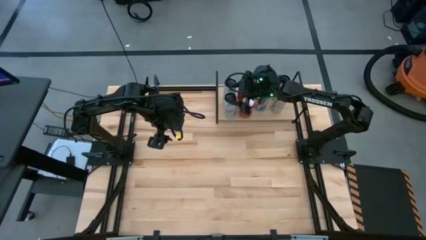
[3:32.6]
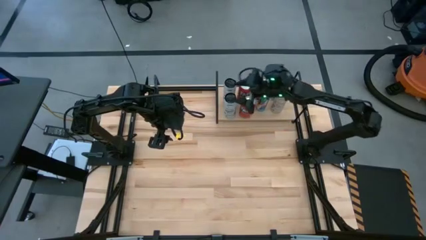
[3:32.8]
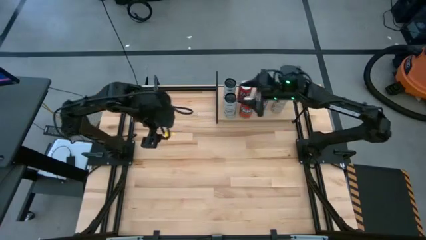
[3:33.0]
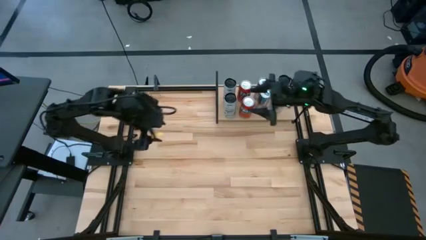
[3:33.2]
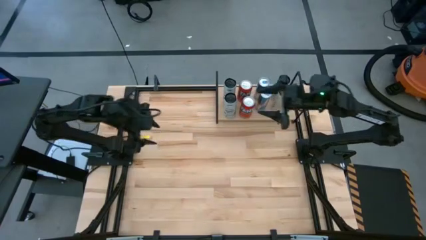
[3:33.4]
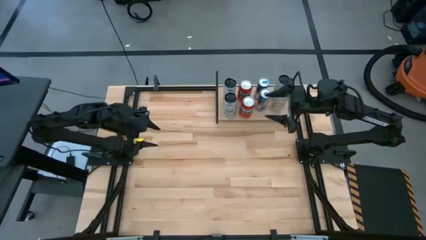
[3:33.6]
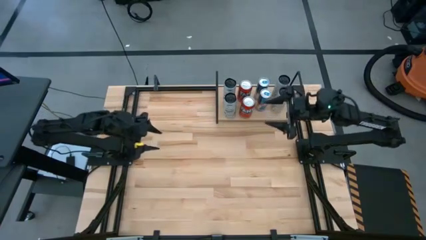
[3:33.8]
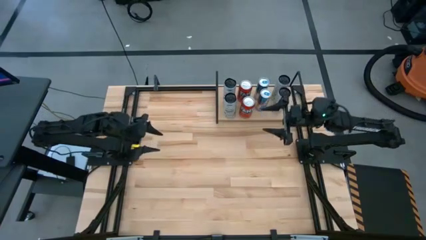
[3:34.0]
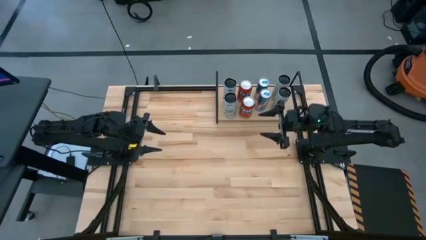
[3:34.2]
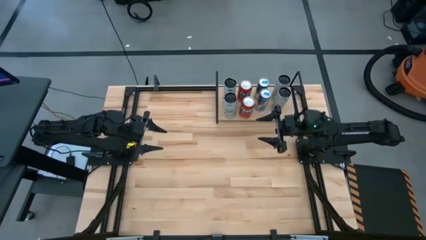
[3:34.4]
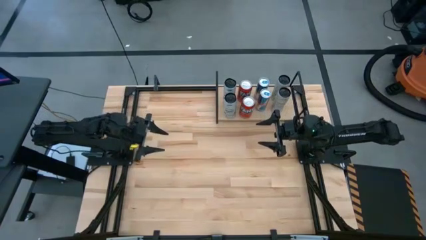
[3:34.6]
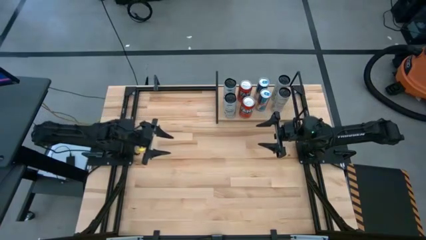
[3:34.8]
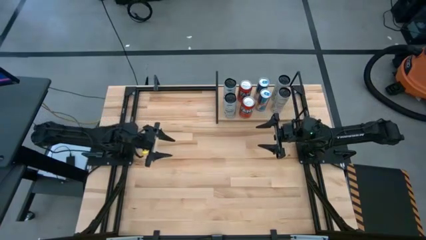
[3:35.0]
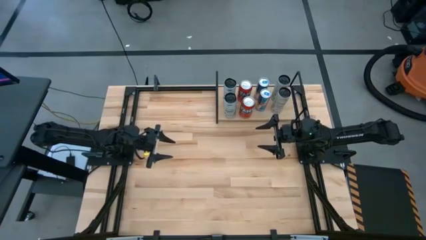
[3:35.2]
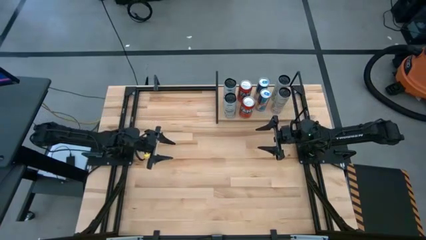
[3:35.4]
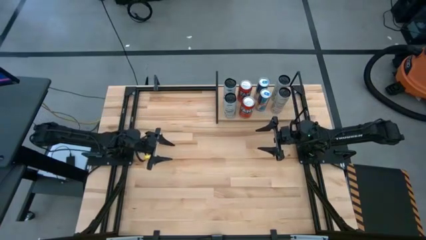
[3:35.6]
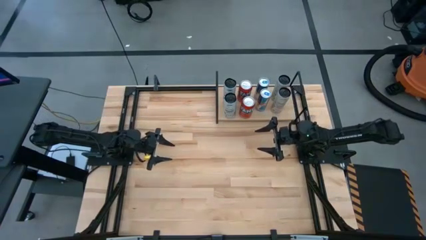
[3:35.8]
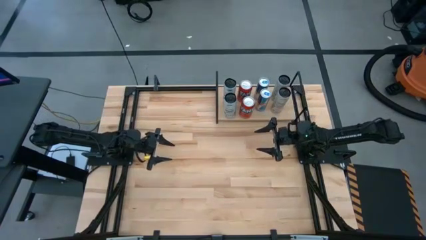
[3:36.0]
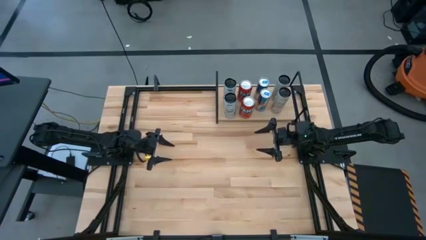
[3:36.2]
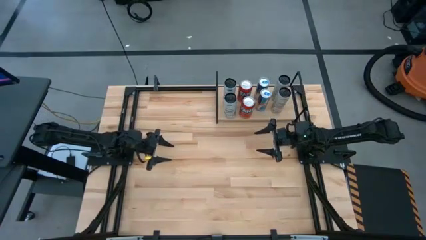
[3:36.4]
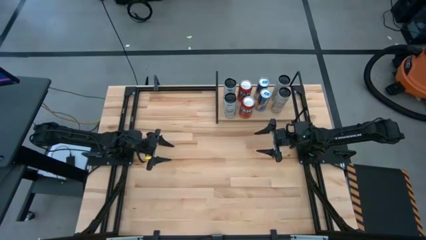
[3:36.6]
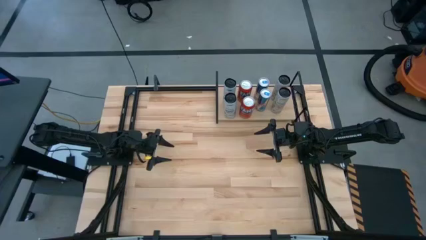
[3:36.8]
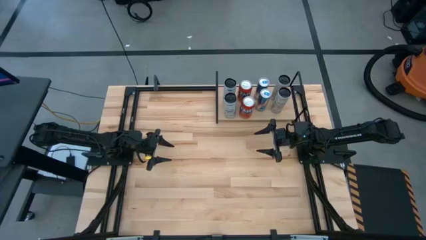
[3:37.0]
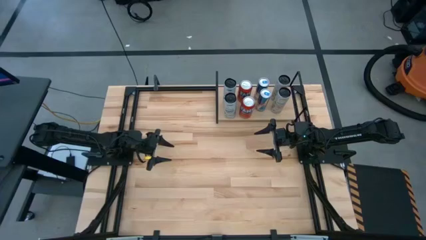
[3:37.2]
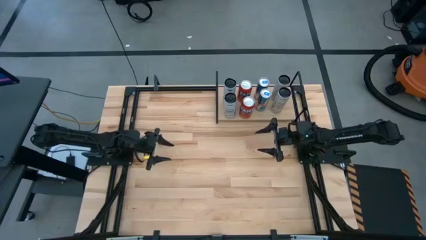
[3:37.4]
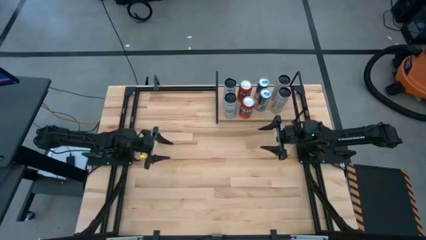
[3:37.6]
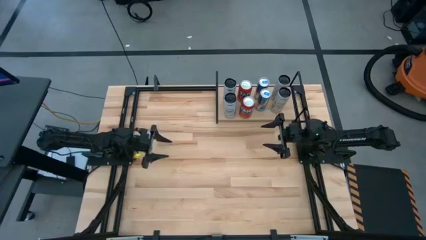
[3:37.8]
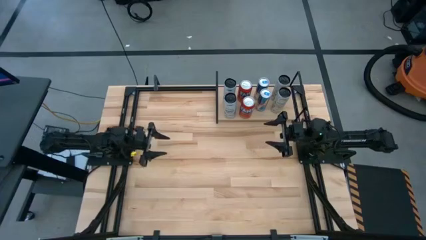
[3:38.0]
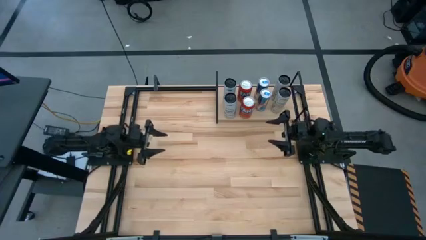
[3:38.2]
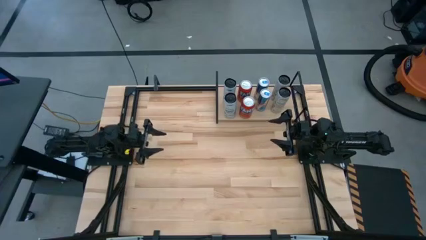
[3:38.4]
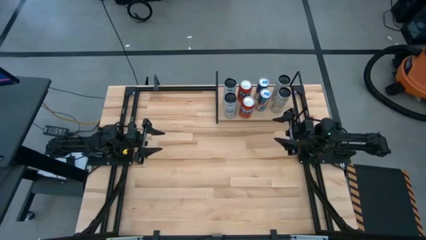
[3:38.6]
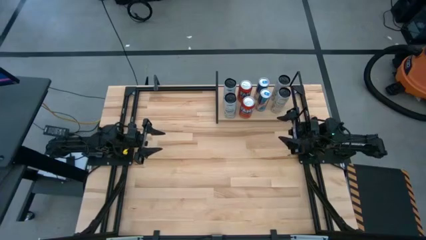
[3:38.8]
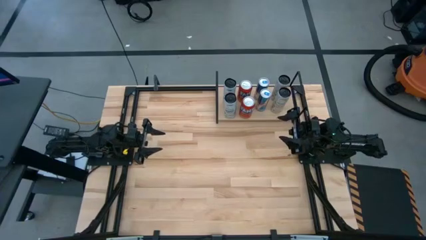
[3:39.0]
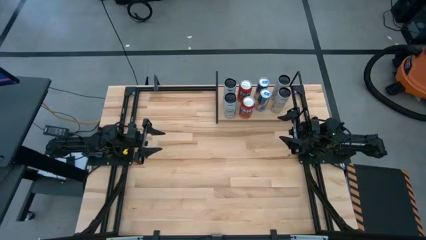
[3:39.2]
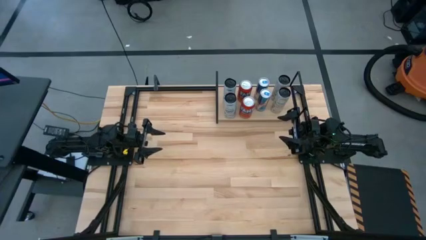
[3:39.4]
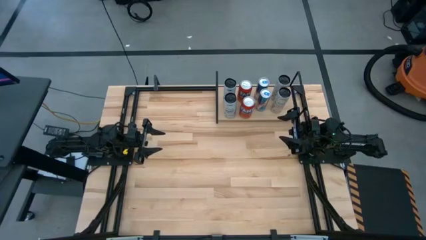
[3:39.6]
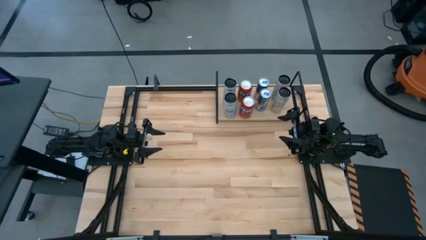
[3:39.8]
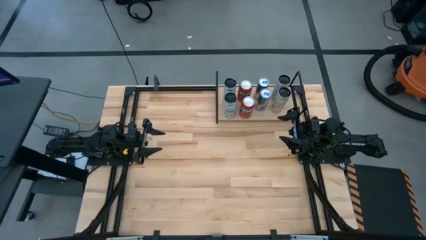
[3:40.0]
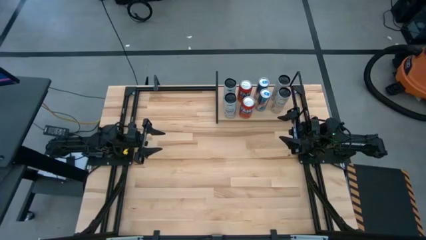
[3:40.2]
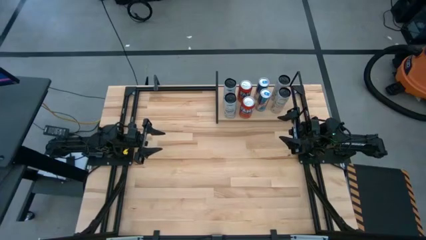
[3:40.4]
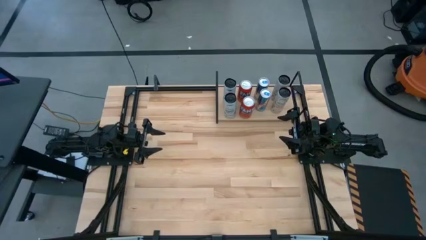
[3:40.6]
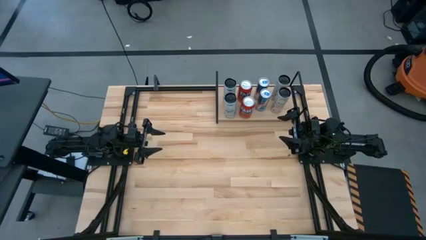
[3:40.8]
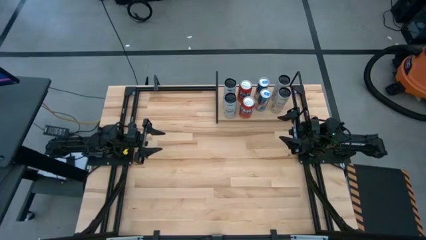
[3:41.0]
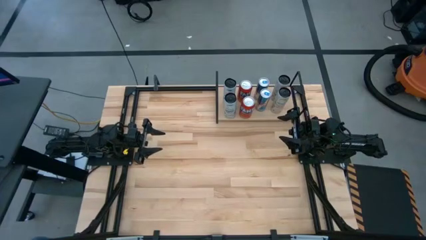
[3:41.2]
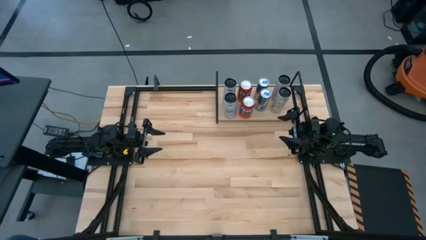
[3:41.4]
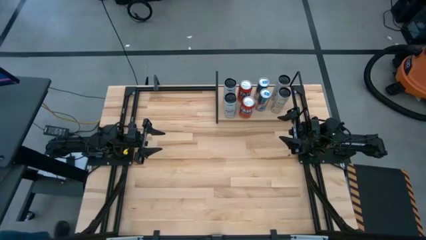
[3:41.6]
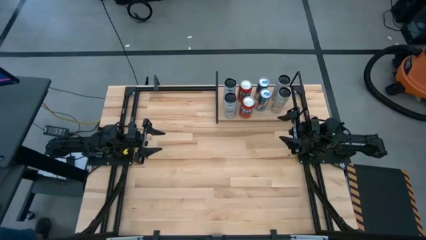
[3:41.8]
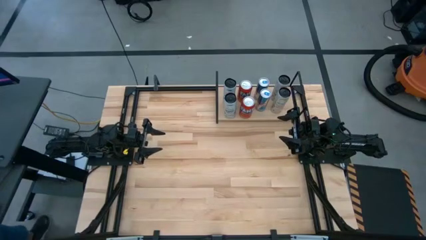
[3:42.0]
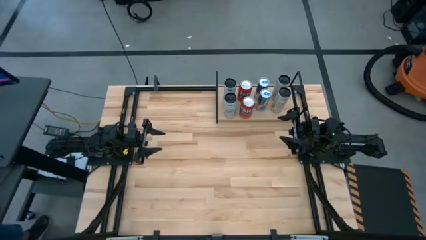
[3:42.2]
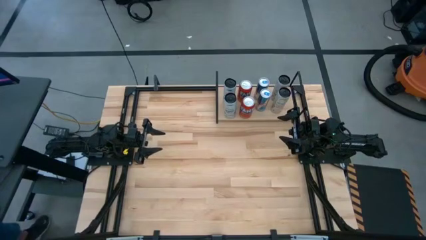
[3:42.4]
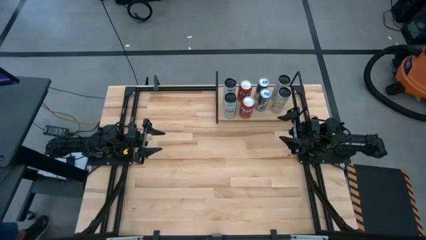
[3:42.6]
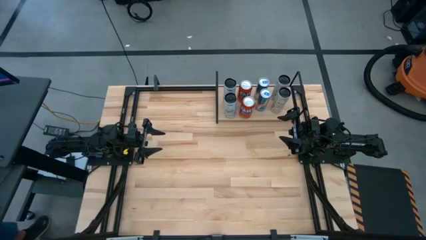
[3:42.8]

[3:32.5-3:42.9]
Task: Place canned beverage on shelf
Return to Home Position

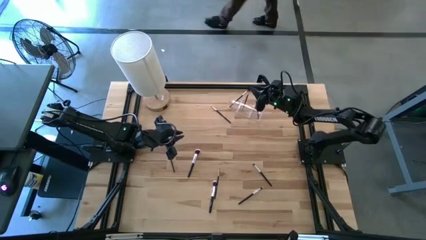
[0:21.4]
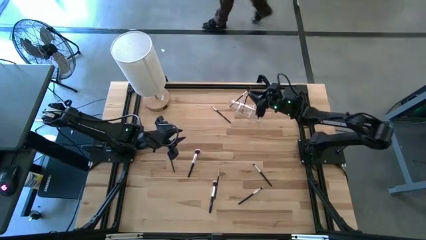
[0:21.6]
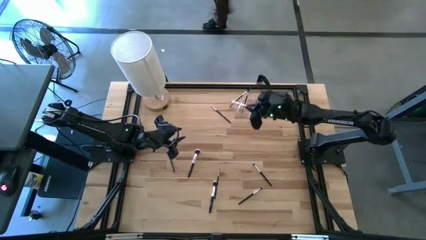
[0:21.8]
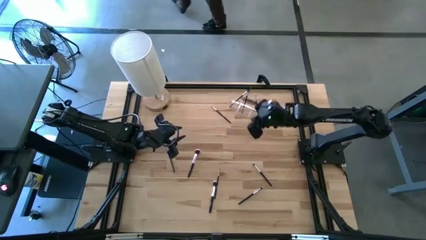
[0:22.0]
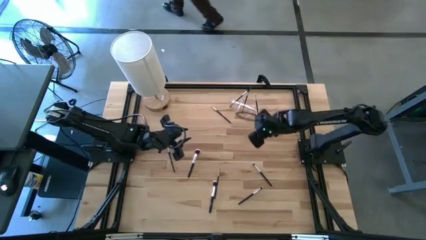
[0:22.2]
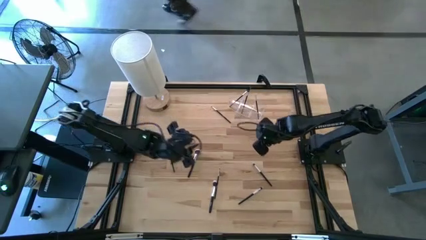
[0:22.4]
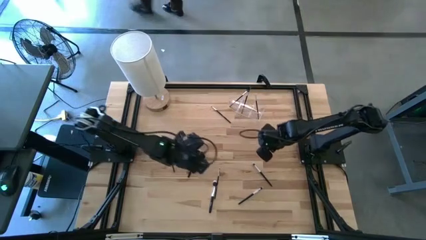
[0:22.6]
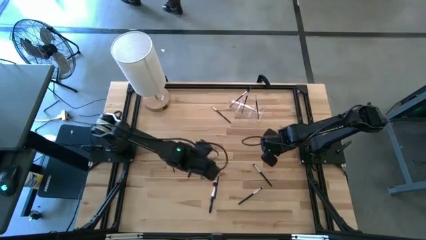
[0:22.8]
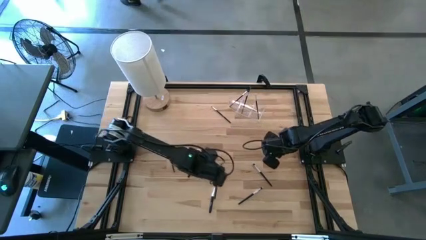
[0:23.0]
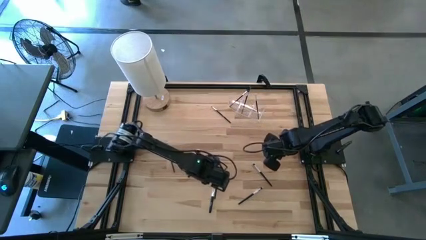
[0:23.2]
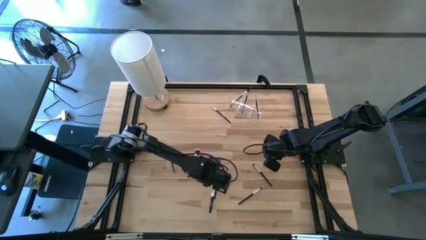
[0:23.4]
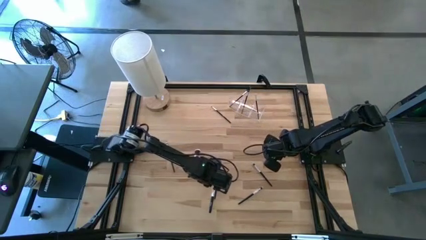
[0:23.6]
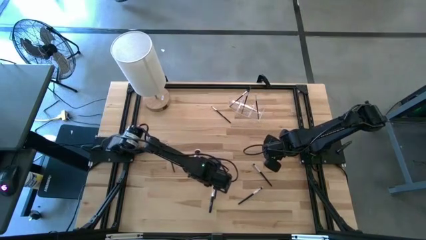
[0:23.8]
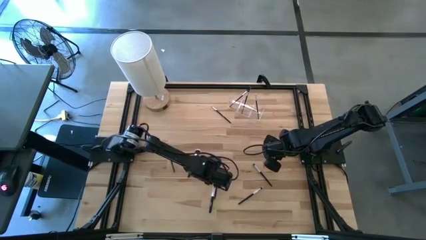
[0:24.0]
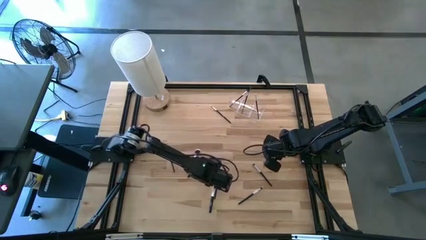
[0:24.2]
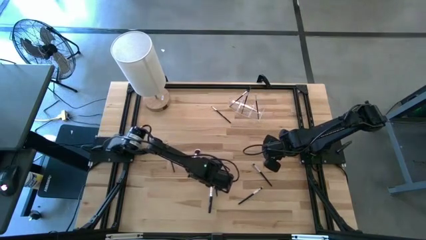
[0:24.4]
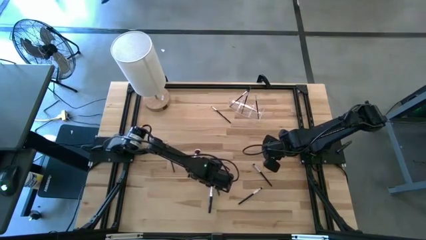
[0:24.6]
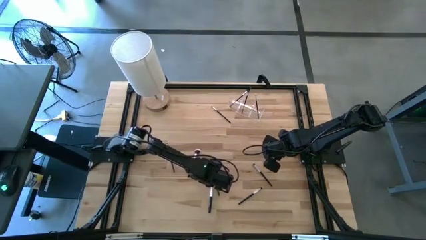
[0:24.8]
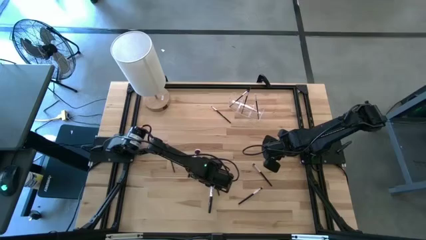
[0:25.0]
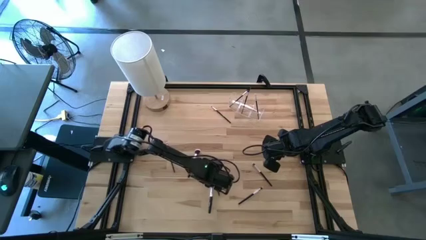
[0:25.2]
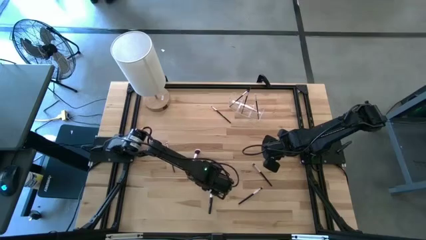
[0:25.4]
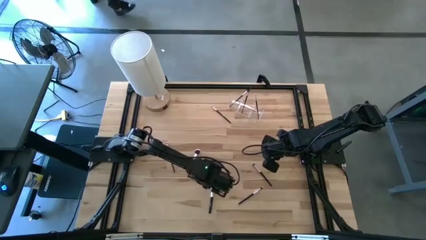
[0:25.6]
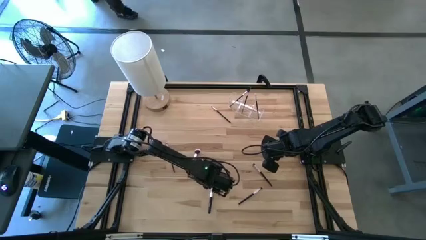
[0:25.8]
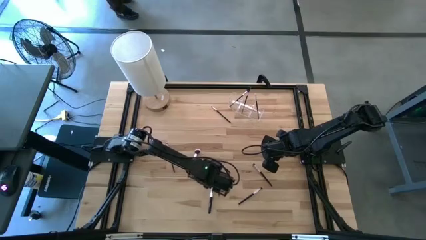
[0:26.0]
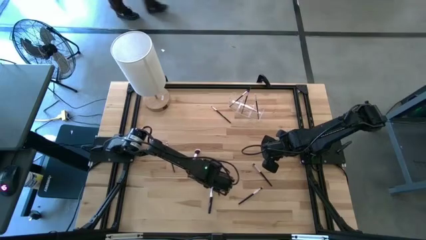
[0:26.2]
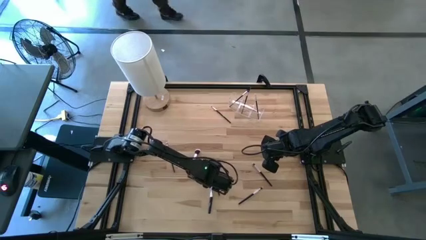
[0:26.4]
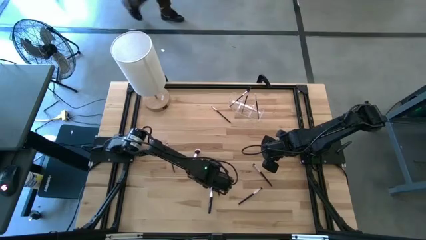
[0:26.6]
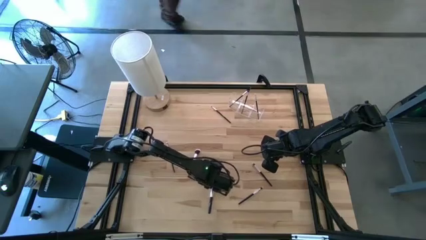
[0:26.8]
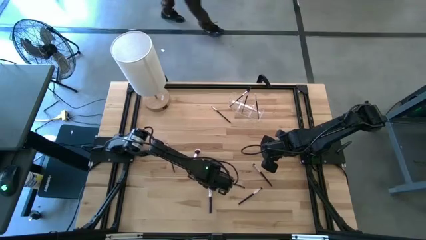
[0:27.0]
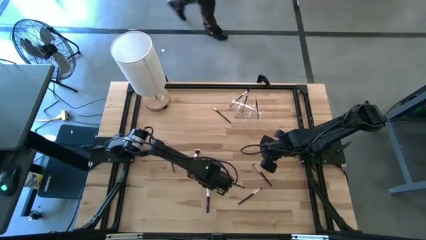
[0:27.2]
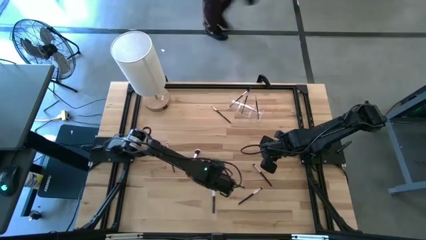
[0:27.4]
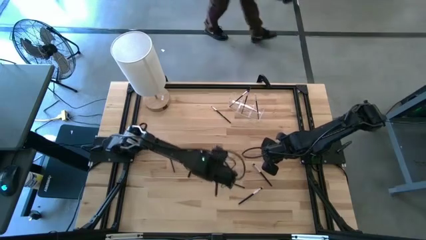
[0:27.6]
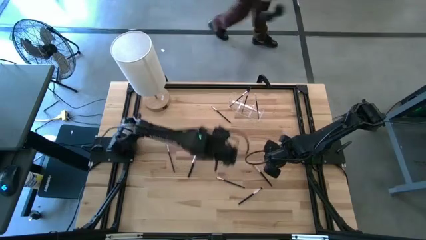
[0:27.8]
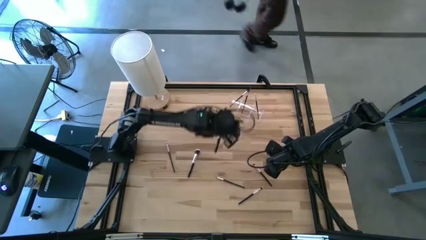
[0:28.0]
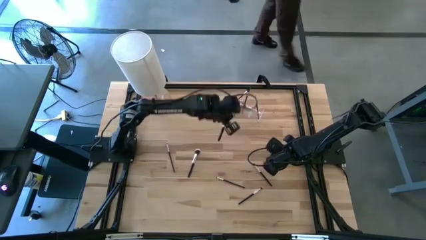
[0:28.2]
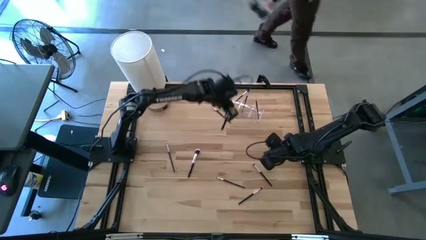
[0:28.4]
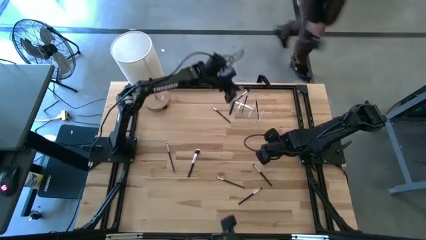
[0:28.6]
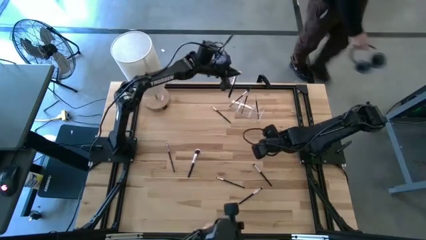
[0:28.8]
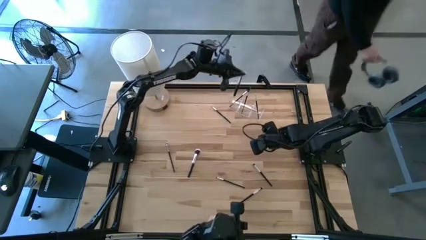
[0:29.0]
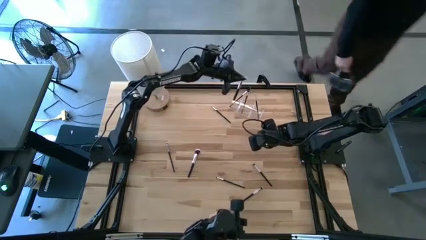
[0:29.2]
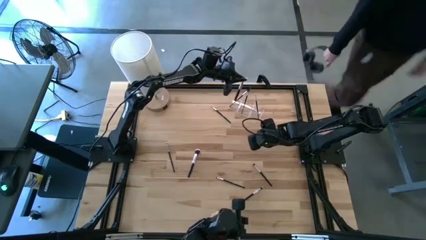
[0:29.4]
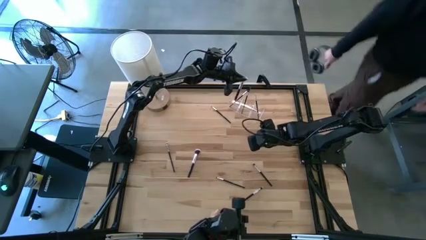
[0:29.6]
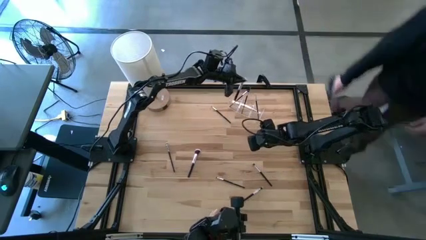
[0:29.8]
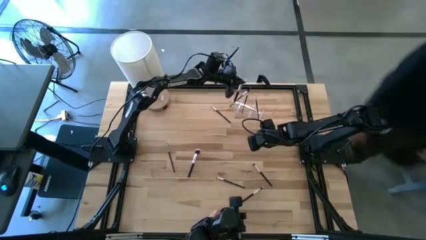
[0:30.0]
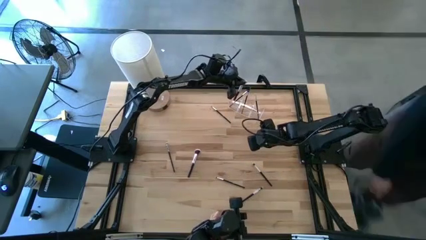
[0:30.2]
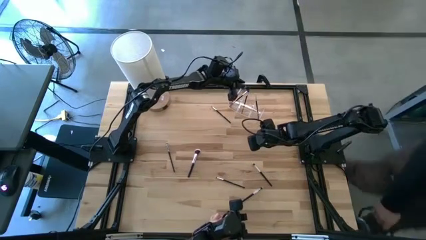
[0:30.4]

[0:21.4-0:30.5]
Task: Pick & Place Makeup Brushes
Put the black makeup brush into the transparent organizer
